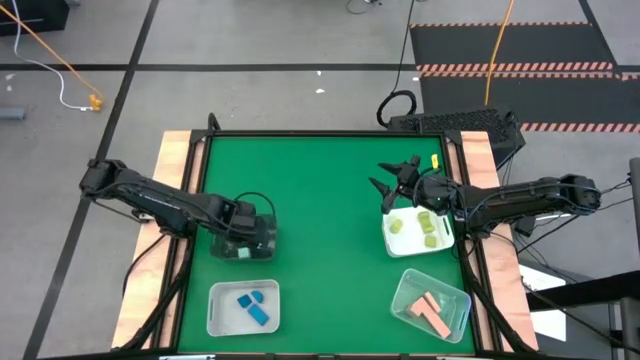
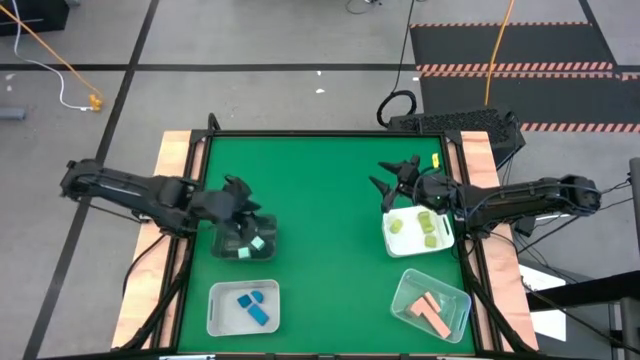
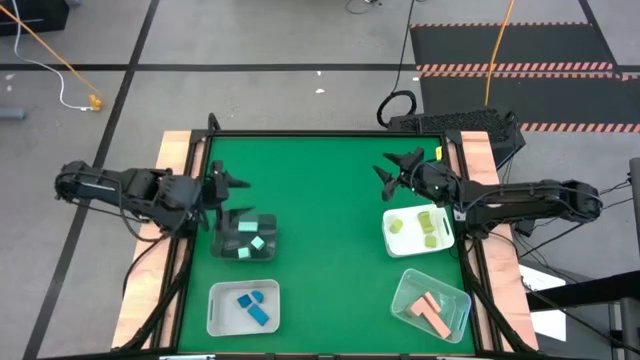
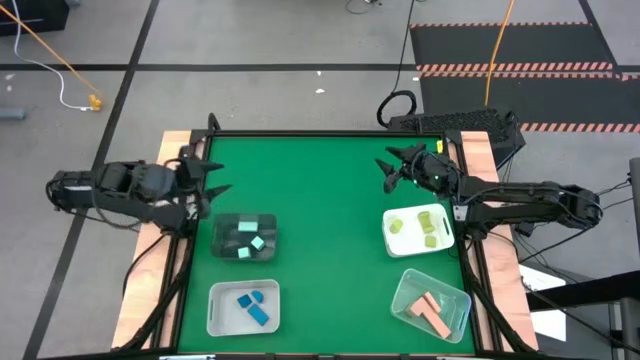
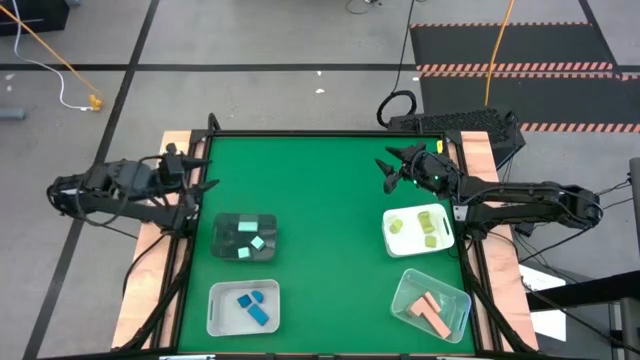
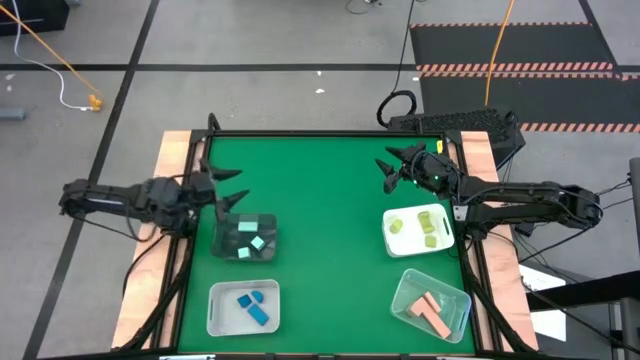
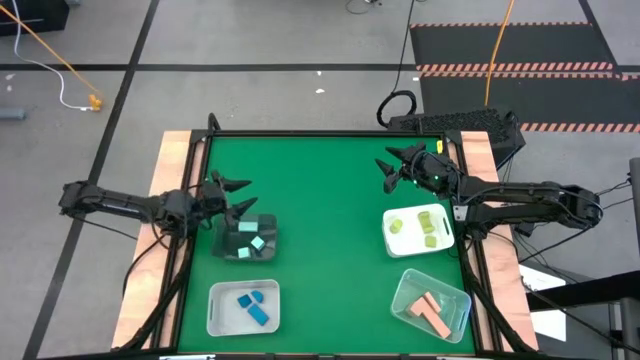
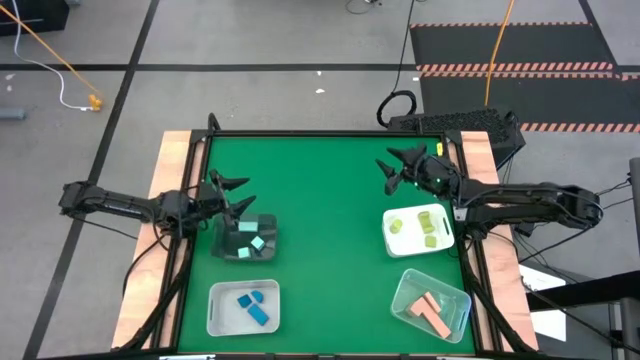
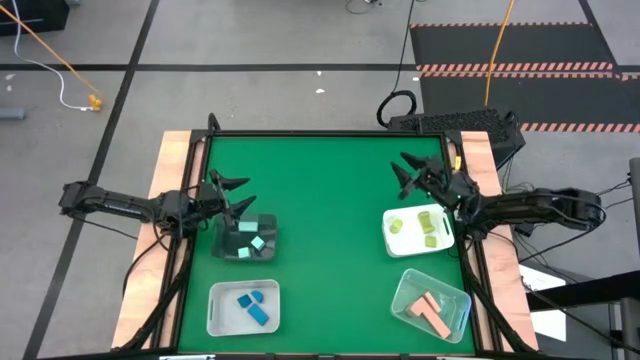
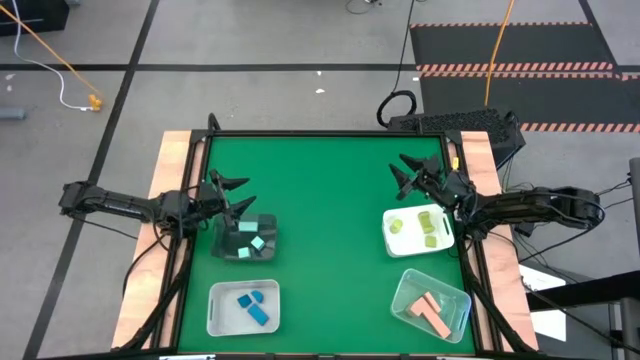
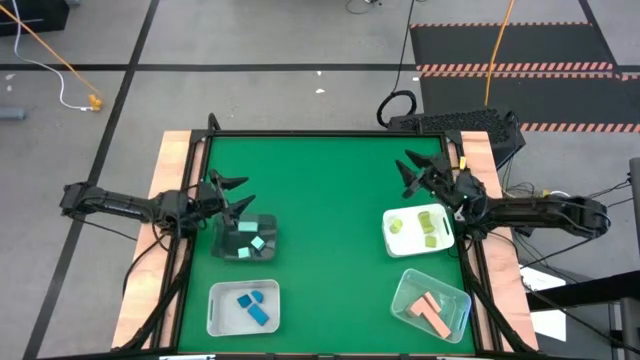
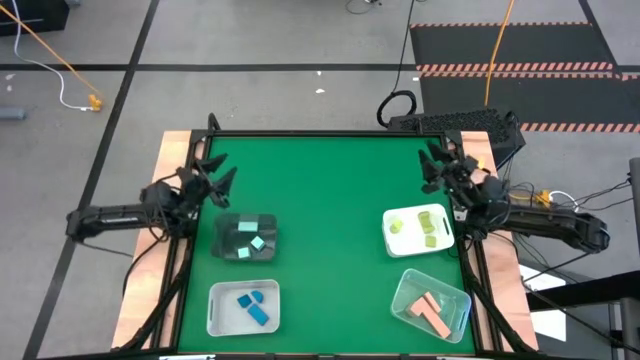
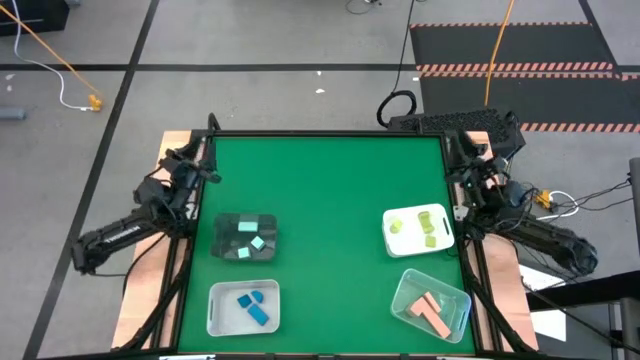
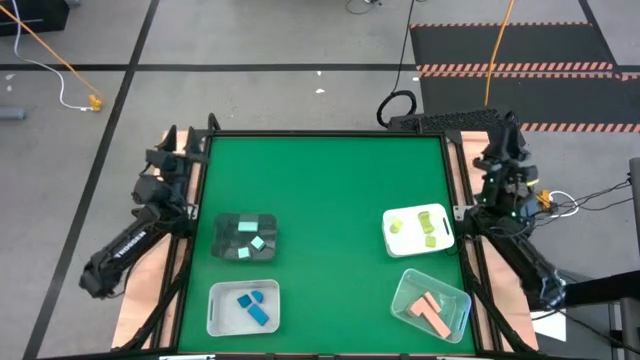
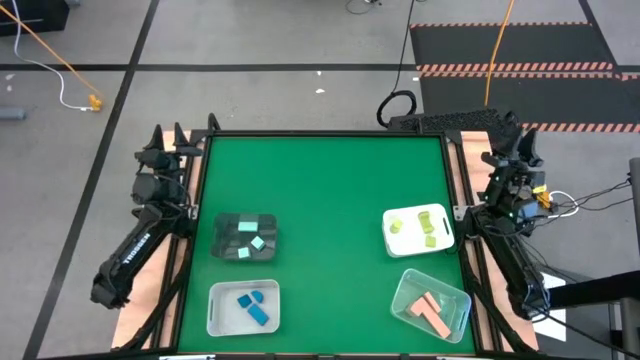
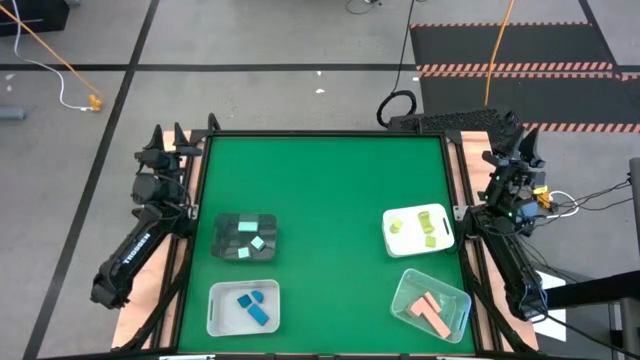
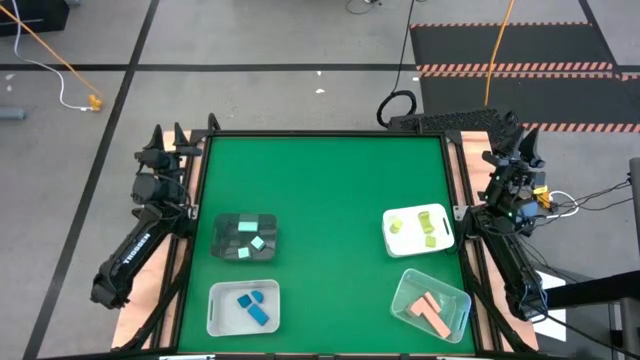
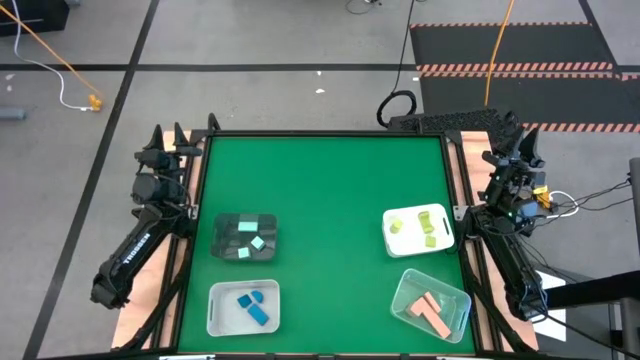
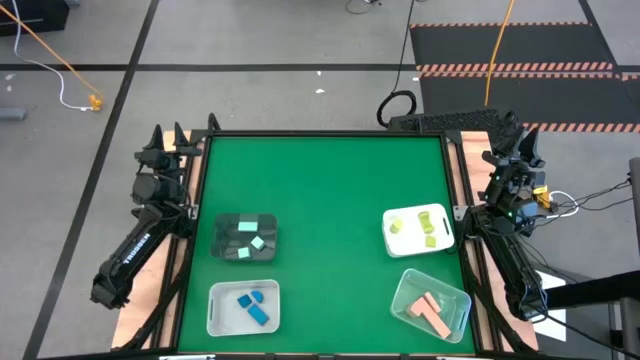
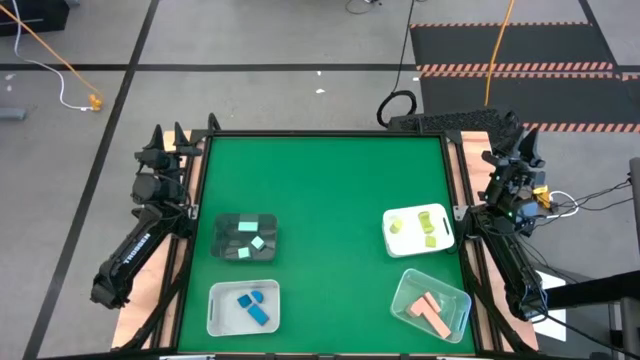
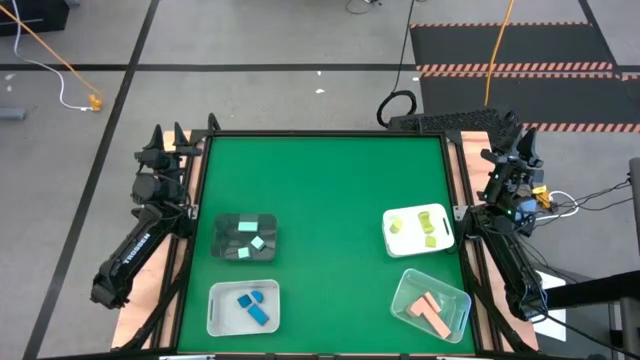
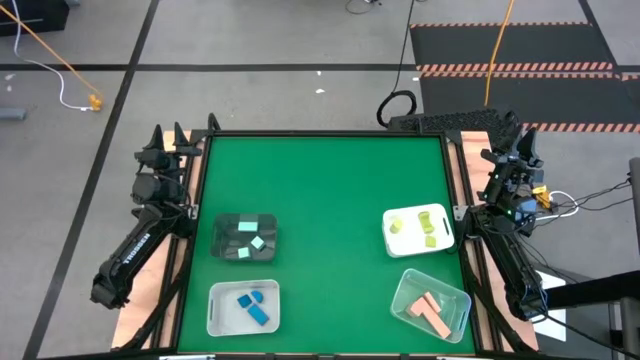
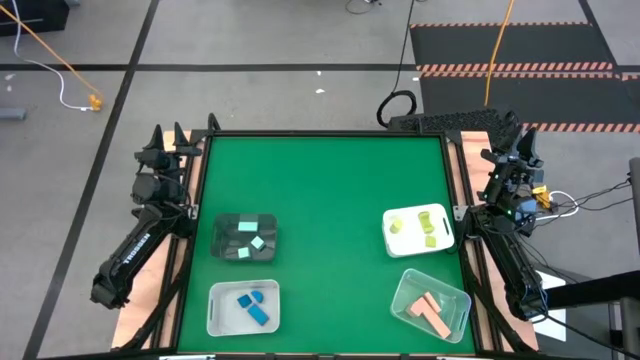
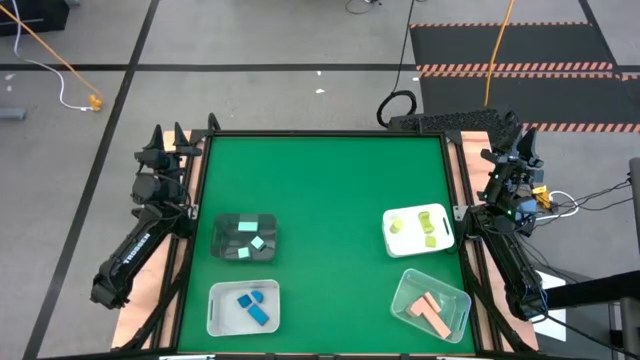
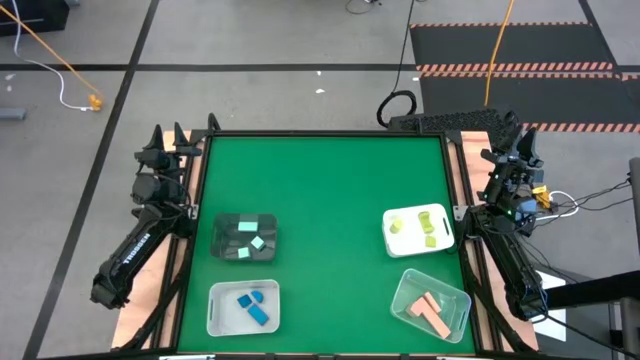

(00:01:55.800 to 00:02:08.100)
Task: Sort & place blocks by color
Return to Home Position

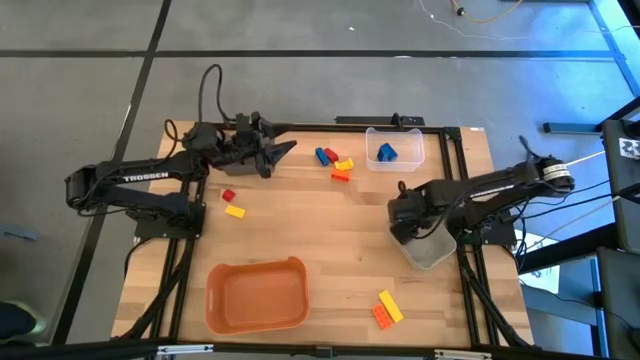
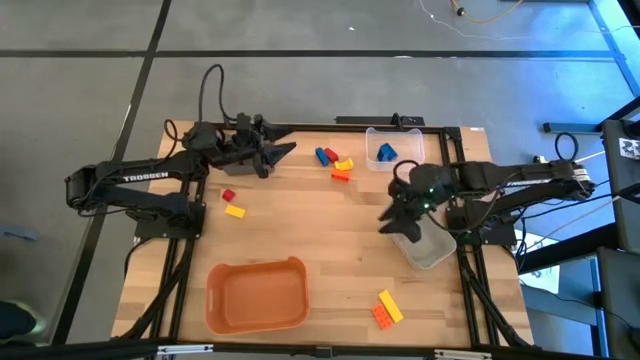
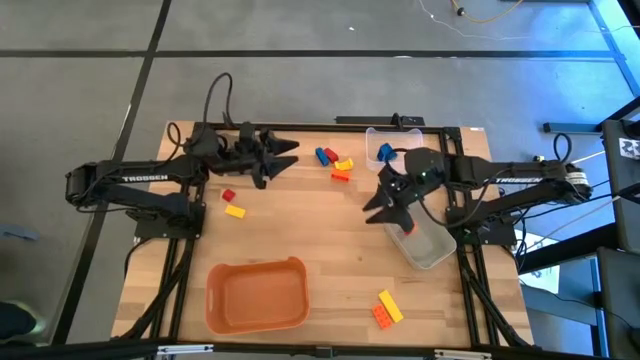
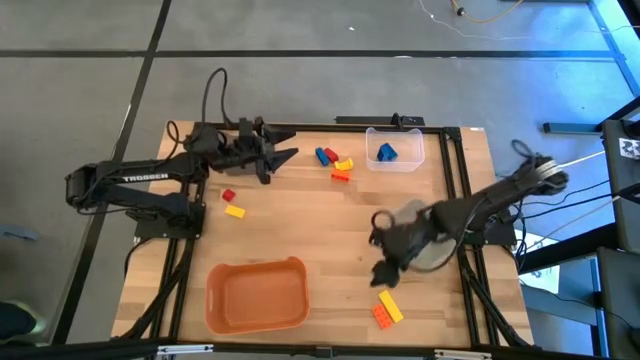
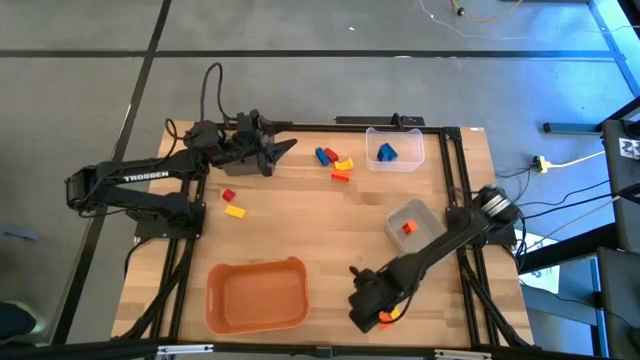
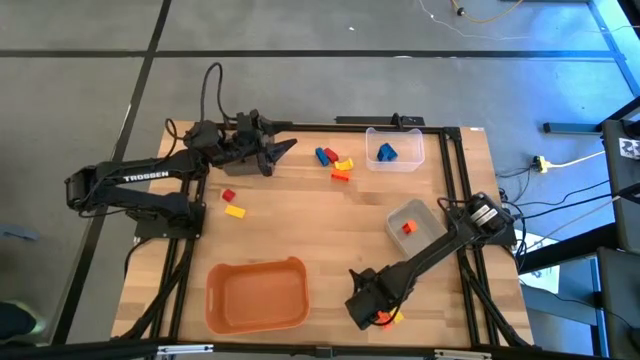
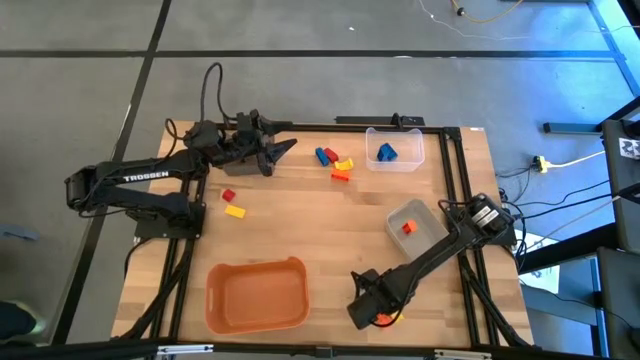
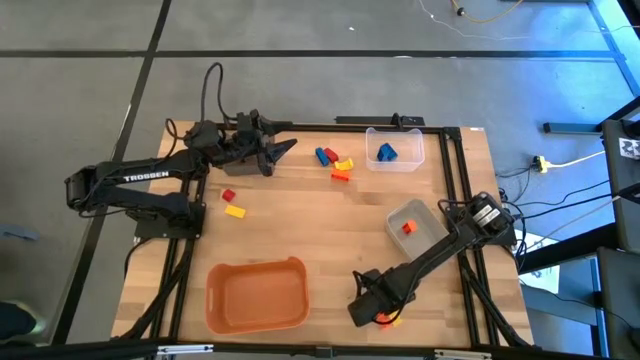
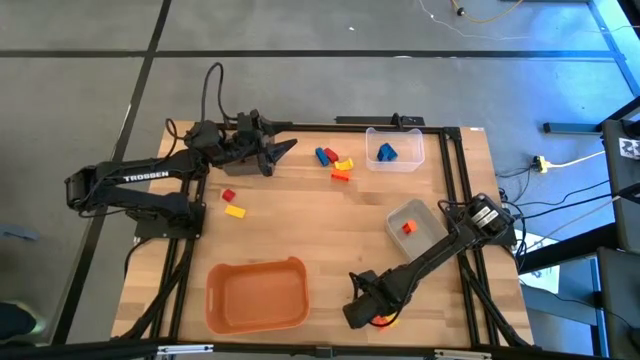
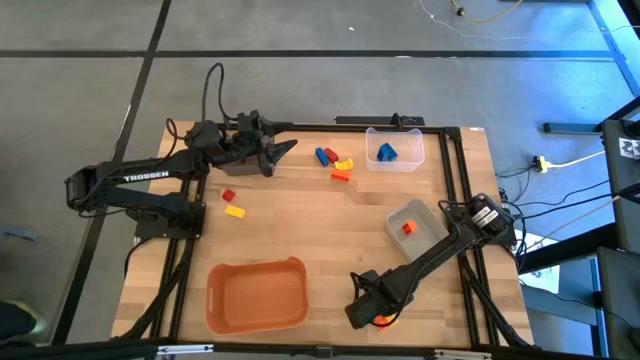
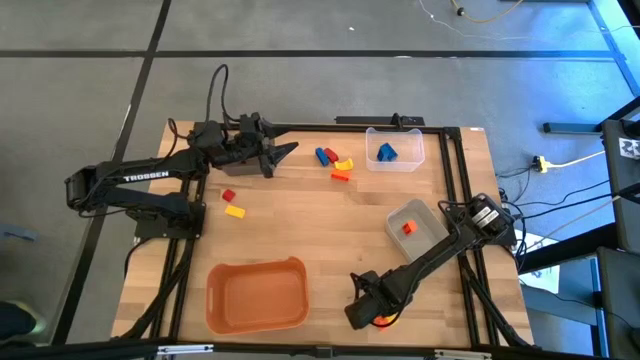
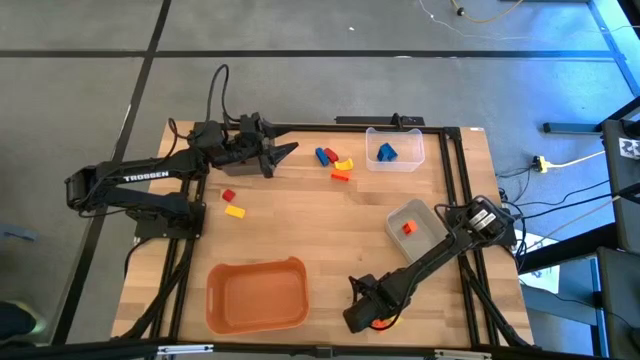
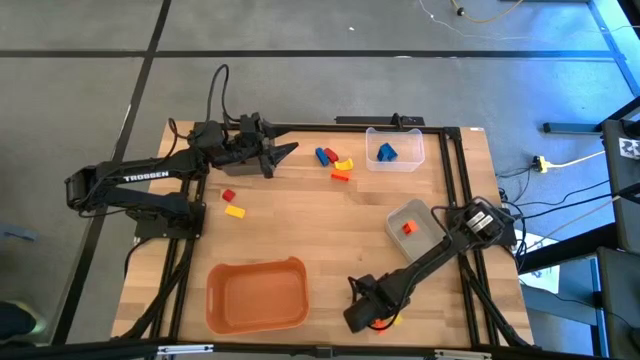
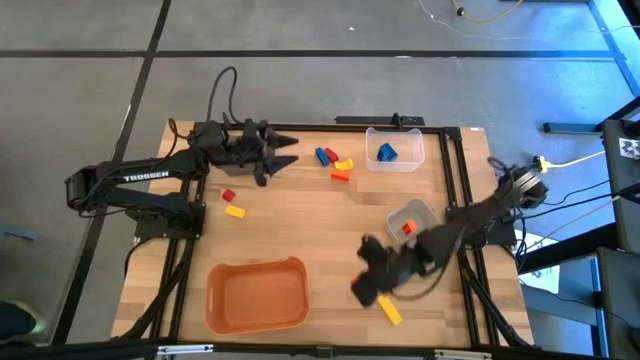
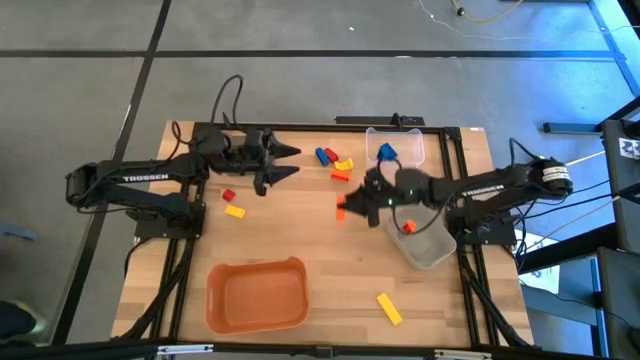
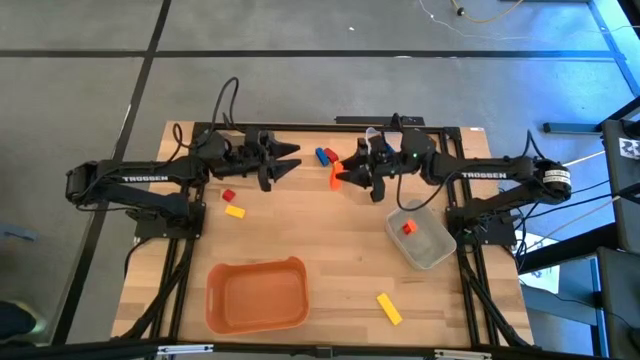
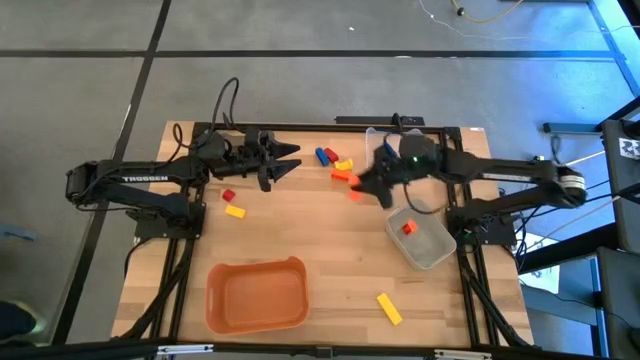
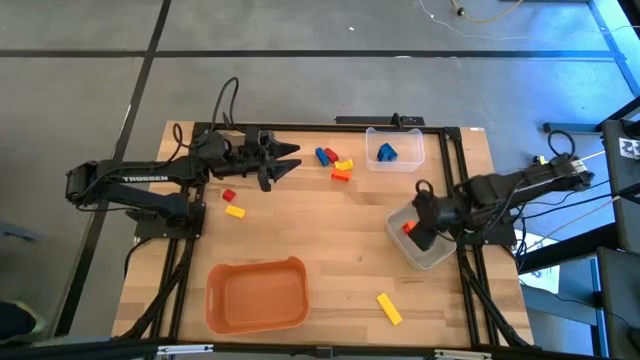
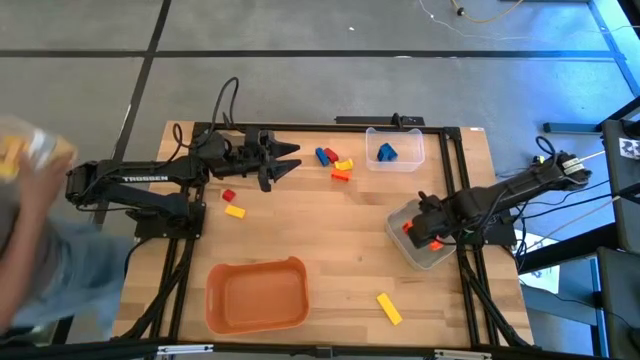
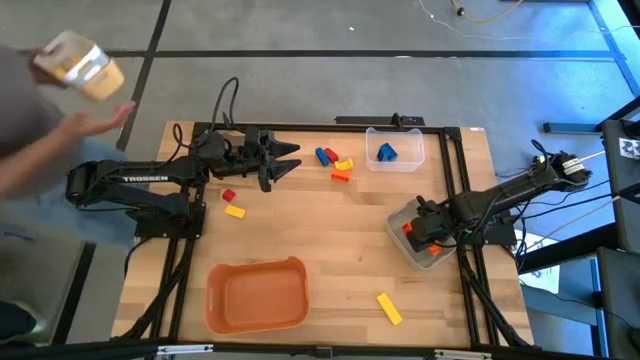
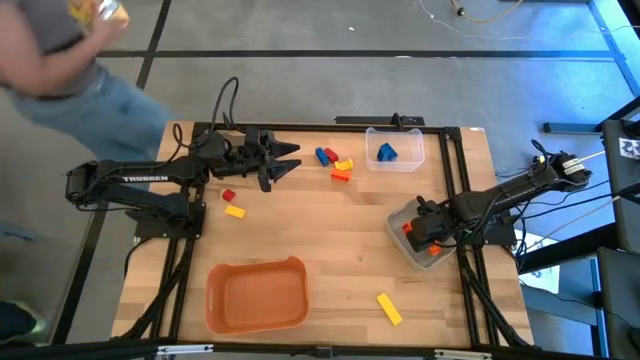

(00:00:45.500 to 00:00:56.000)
Task: Sort & place blocks by color
Put the bottom orange game piece into the gray bin
